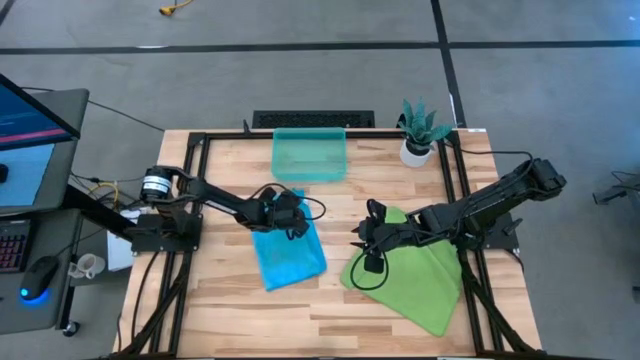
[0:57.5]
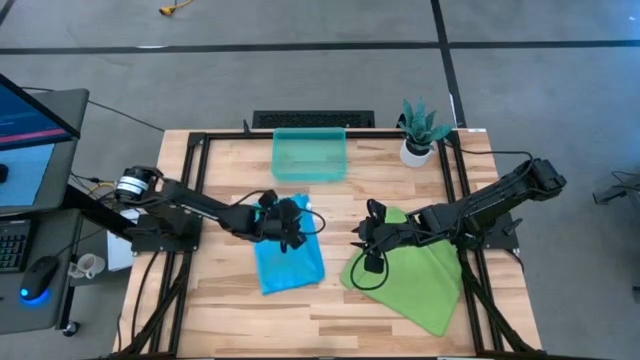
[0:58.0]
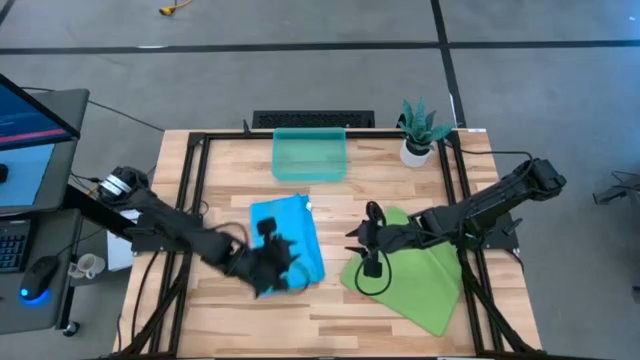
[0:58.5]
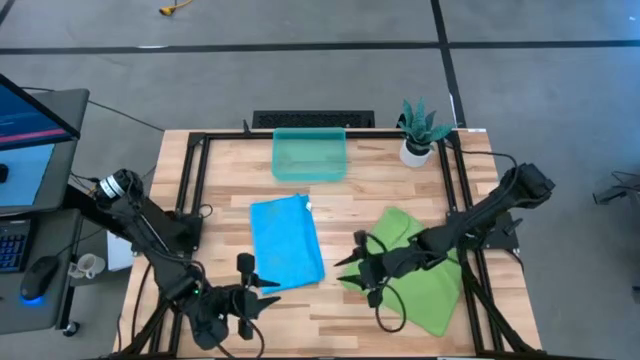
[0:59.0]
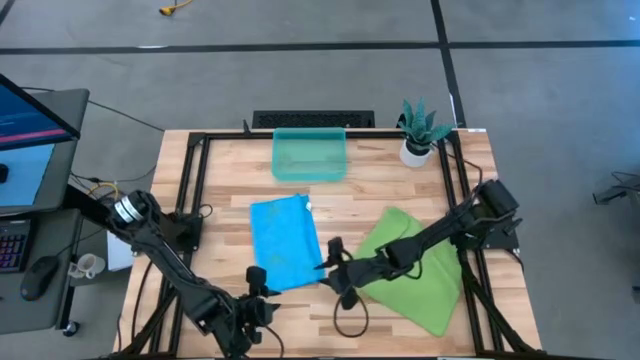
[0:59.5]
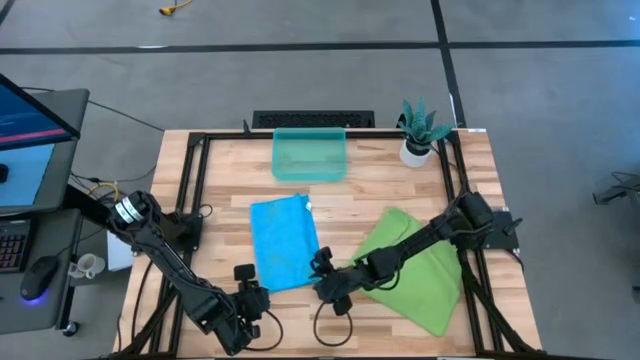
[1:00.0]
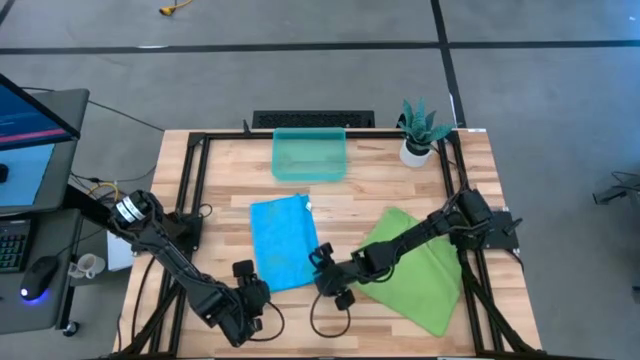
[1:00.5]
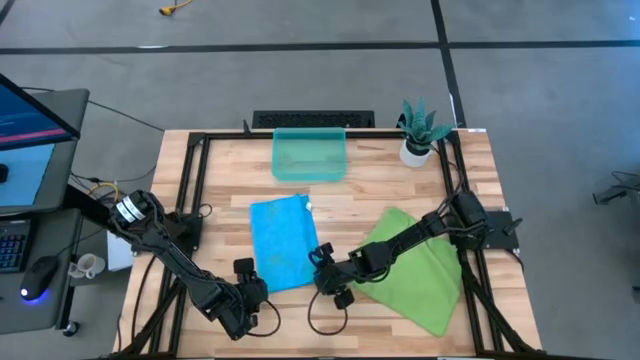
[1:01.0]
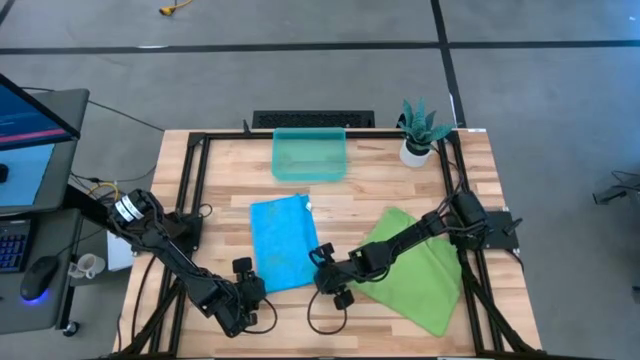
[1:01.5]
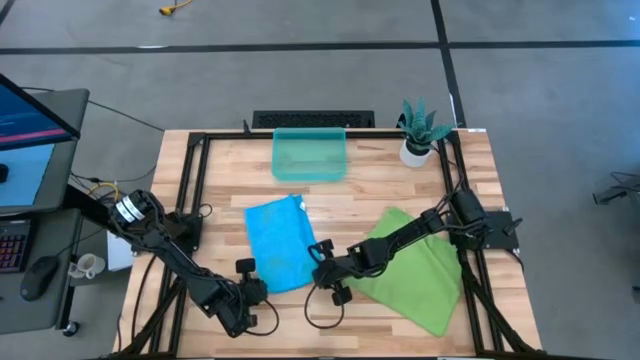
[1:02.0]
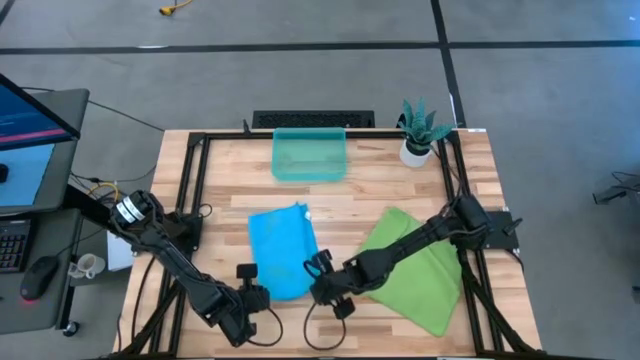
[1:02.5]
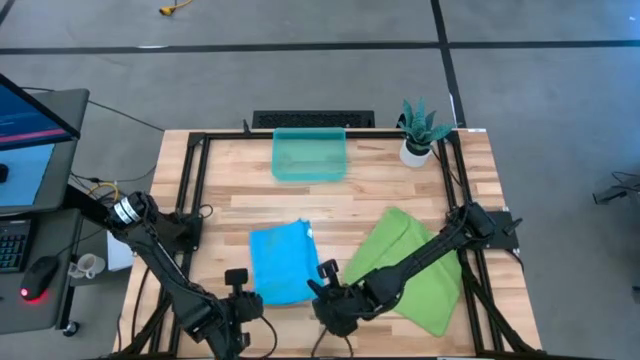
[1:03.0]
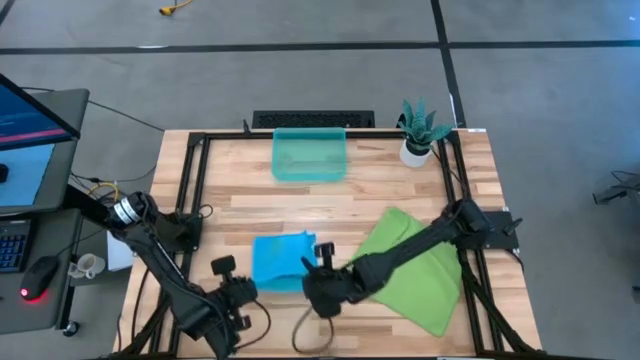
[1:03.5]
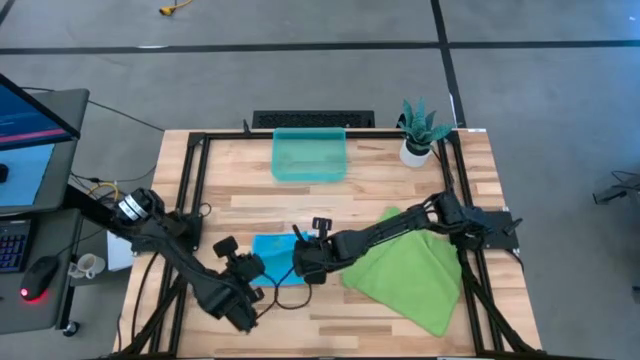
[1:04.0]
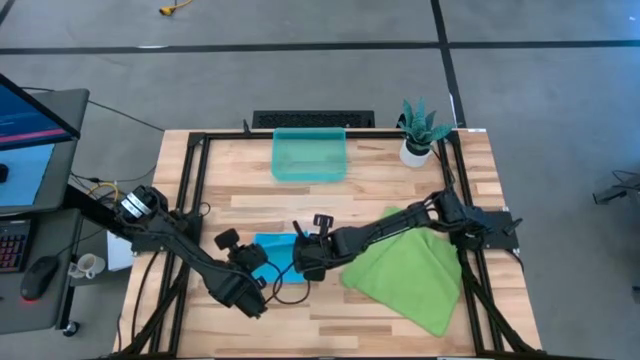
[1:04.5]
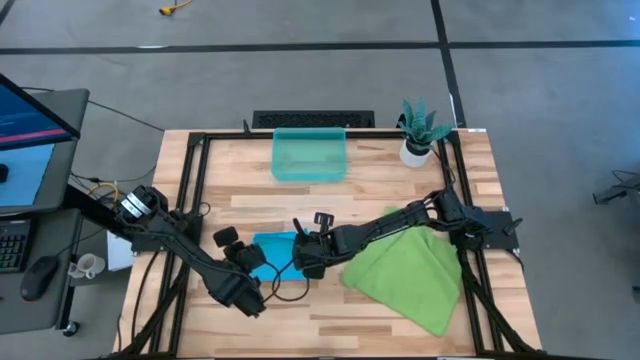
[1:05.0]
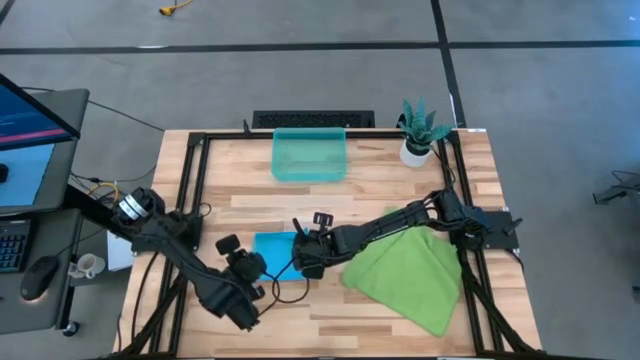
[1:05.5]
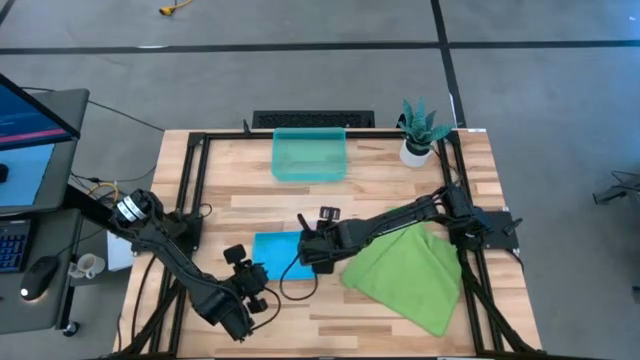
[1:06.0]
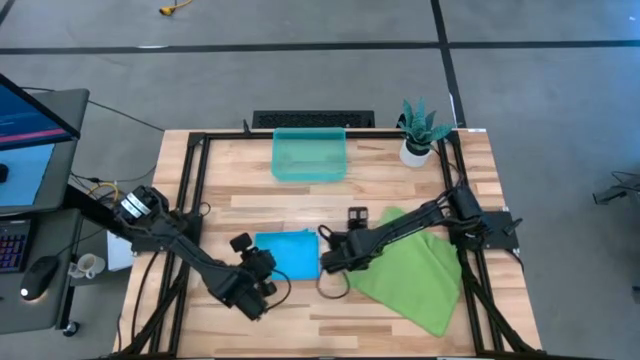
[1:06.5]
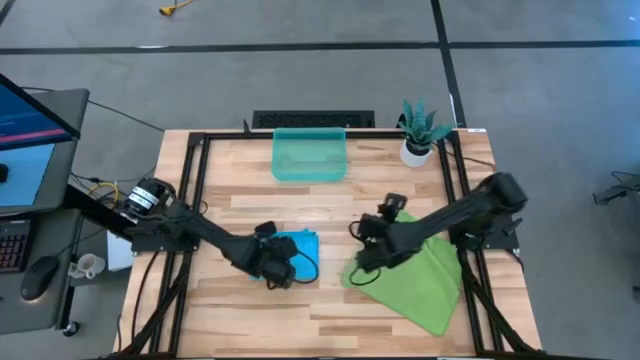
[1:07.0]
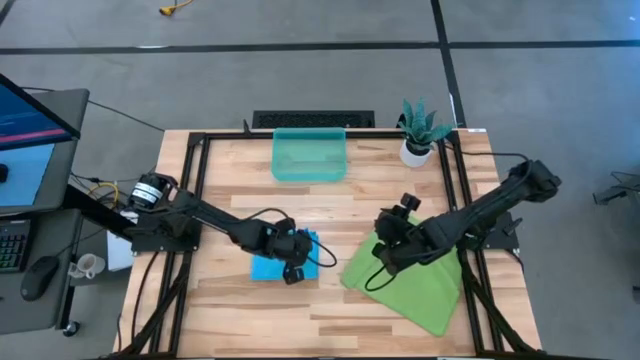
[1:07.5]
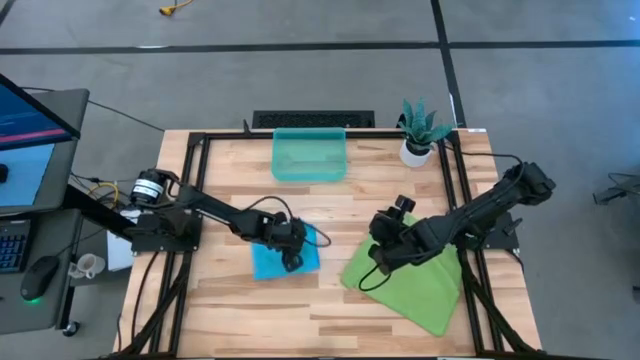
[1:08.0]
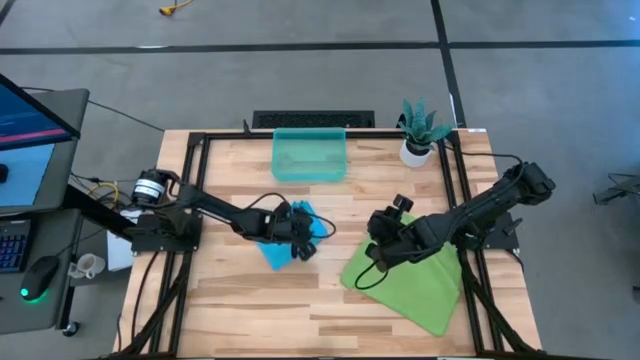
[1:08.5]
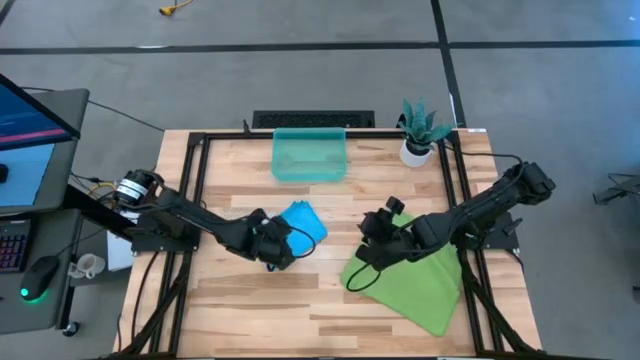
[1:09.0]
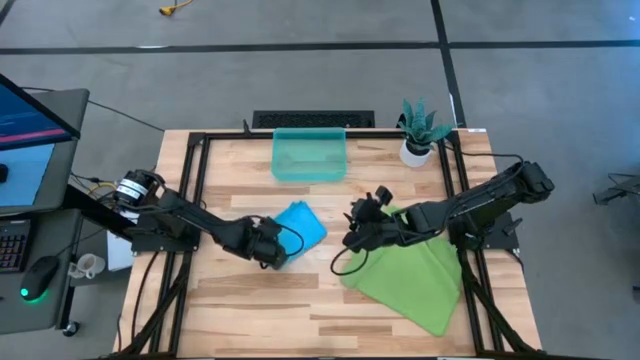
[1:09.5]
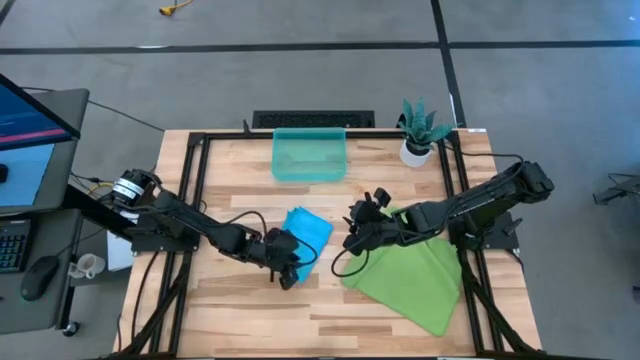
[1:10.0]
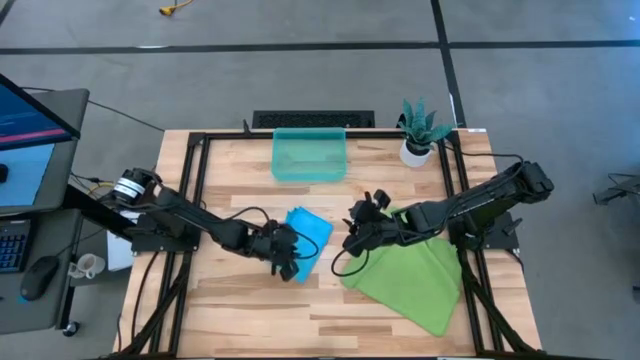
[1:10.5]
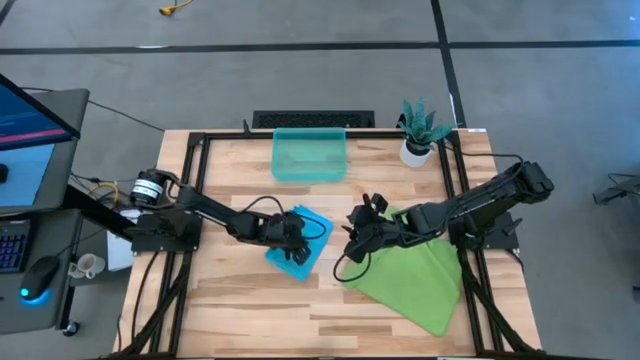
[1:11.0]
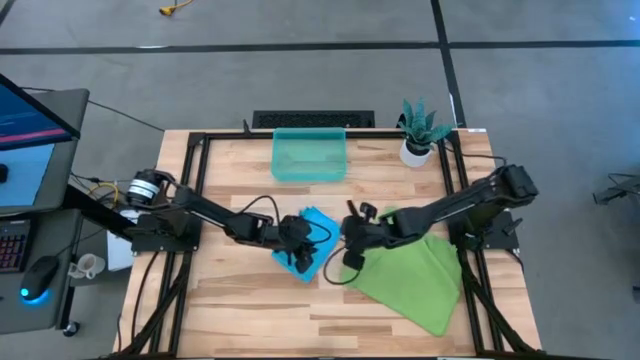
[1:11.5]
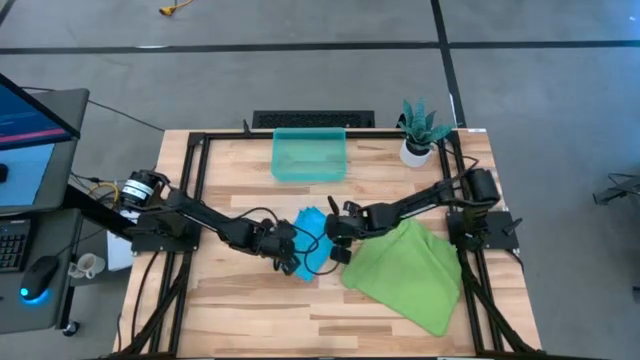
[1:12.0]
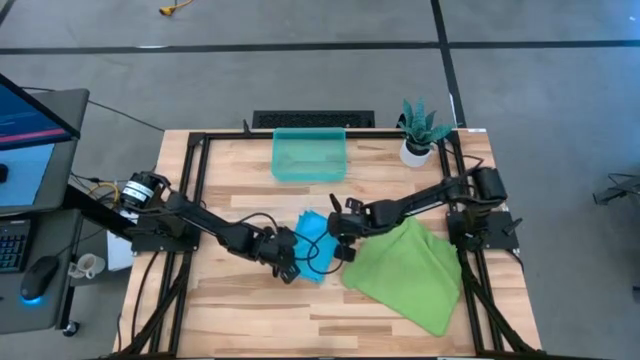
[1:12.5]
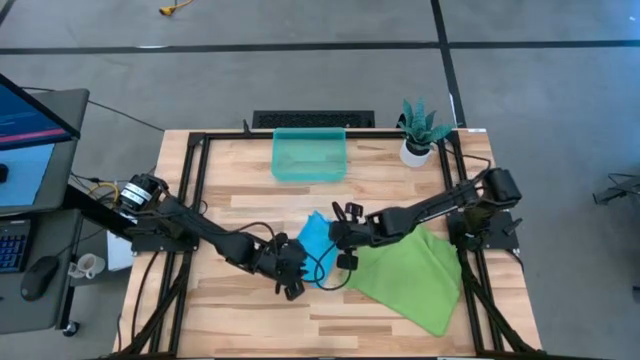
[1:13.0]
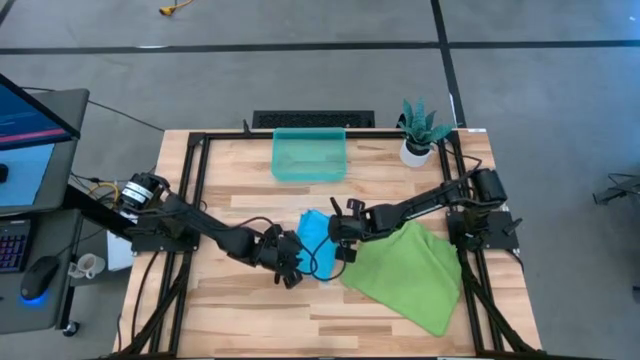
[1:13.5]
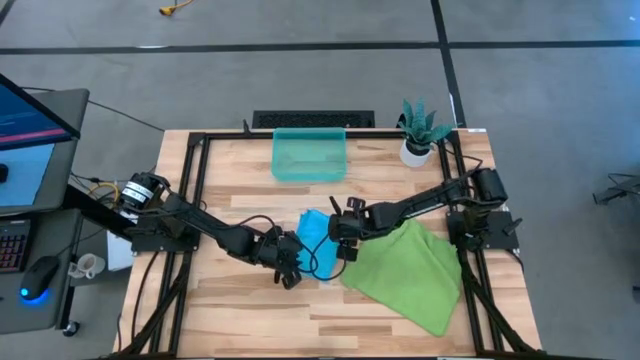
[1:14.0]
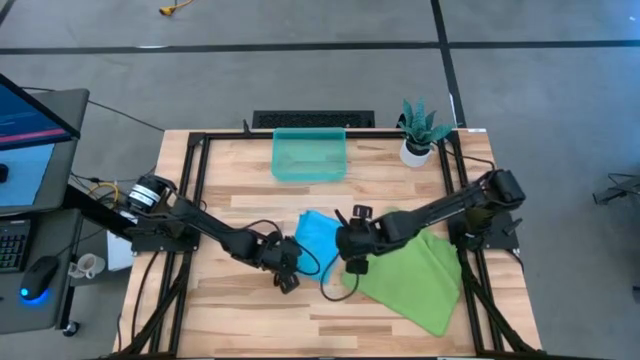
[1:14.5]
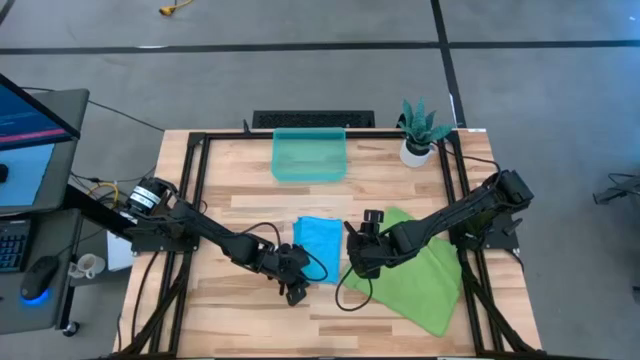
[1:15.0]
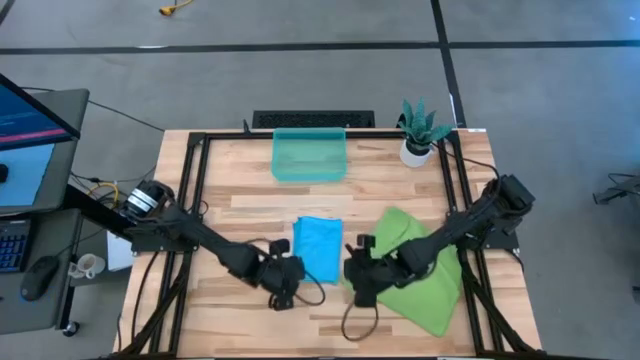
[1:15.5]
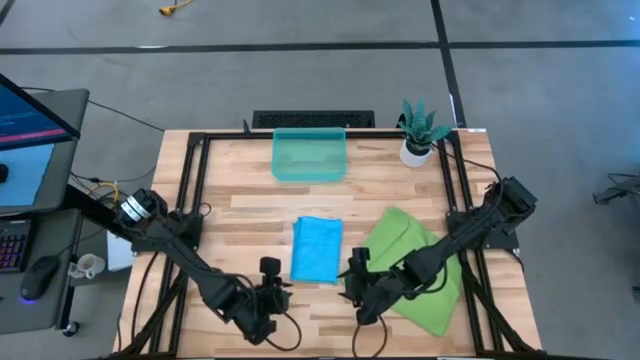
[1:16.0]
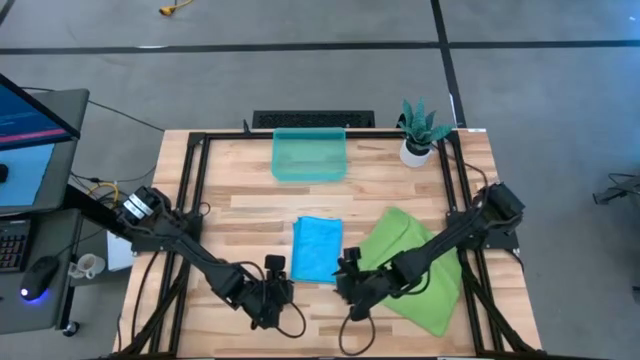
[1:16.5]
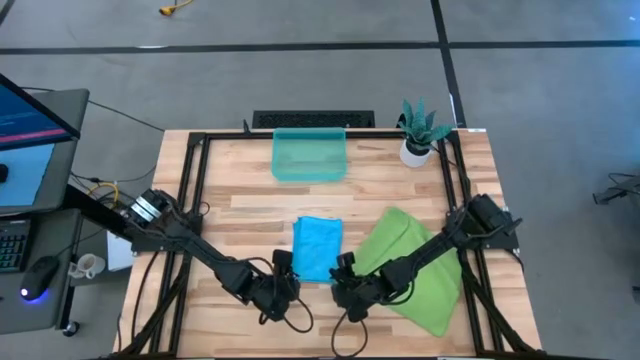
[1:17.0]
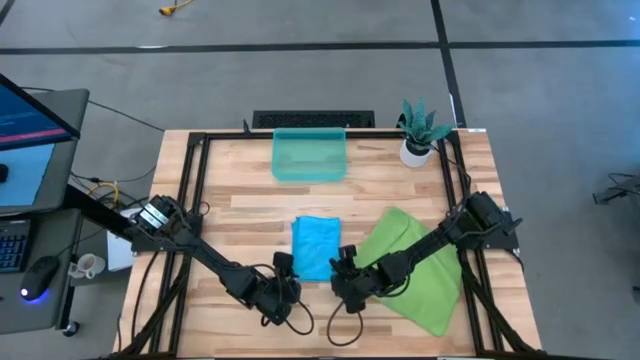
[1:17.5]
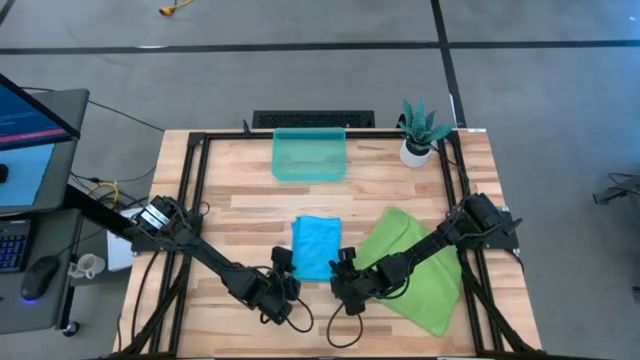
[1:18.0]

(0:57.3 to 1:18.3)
Task: Roll microfiber towels into tight, uniform cylinder then place into a basket
Fold the blue microfiber cloth
